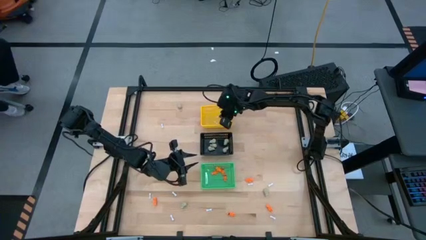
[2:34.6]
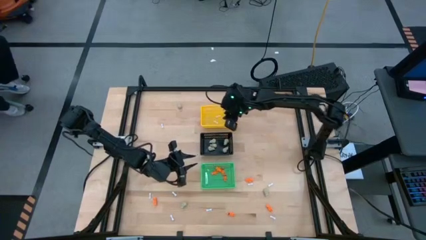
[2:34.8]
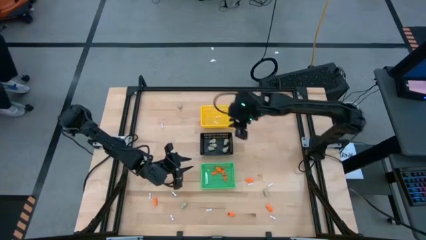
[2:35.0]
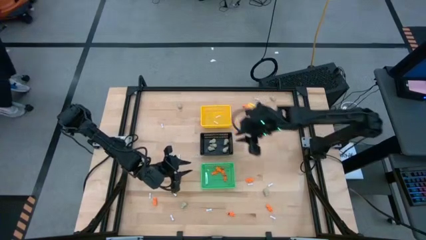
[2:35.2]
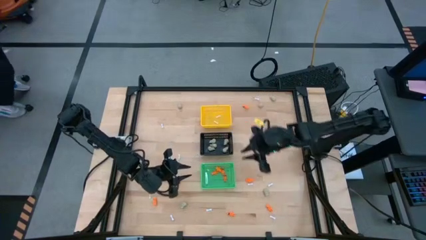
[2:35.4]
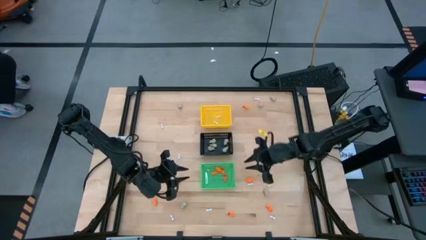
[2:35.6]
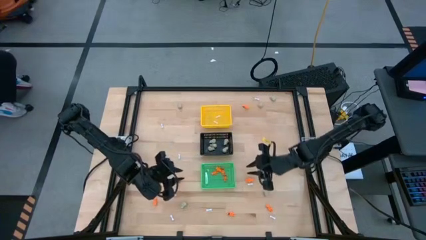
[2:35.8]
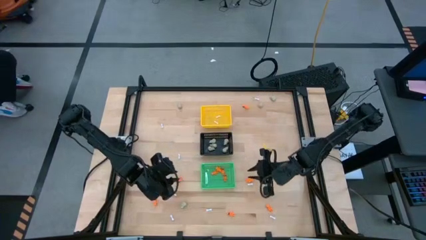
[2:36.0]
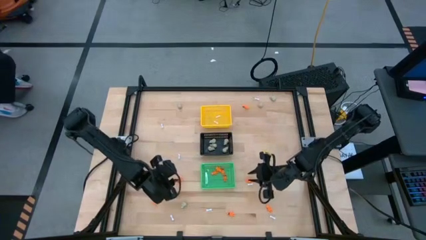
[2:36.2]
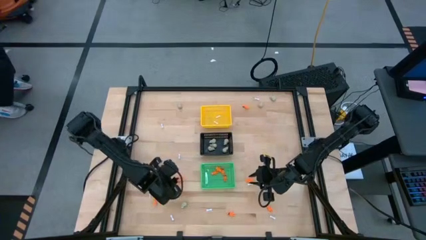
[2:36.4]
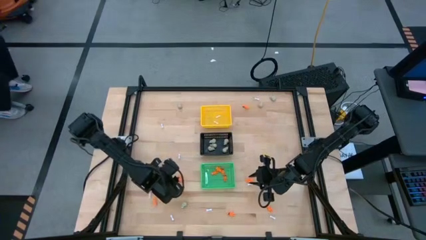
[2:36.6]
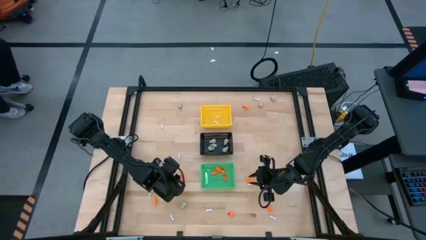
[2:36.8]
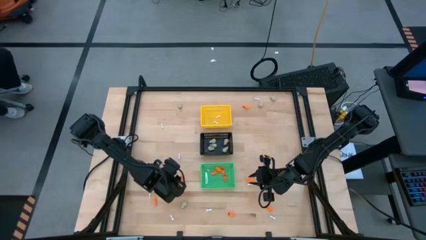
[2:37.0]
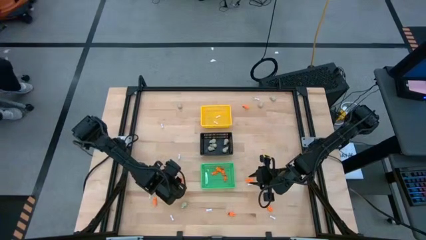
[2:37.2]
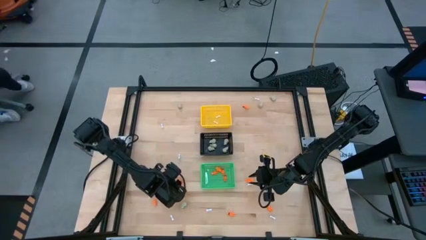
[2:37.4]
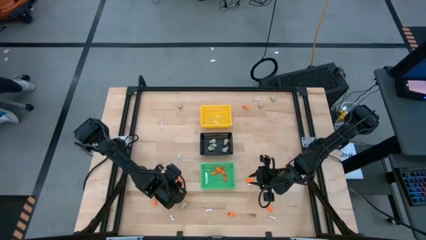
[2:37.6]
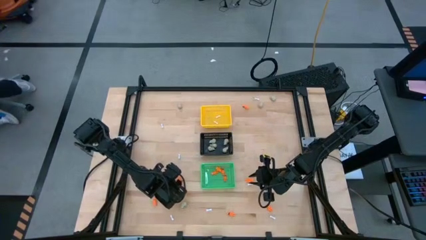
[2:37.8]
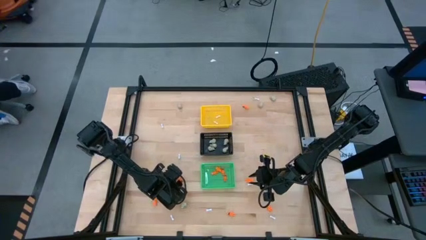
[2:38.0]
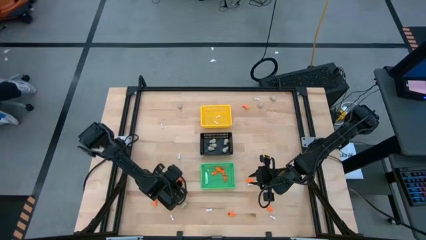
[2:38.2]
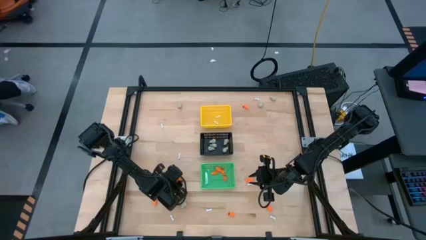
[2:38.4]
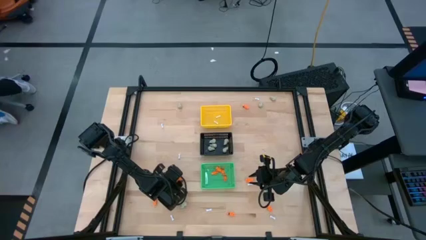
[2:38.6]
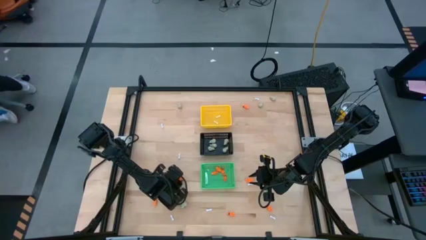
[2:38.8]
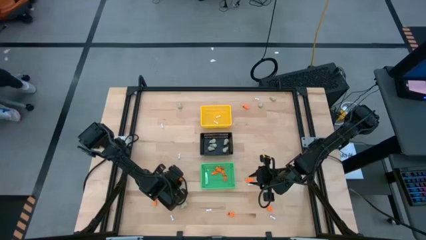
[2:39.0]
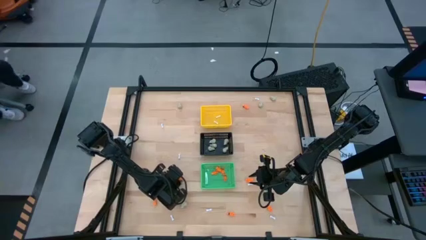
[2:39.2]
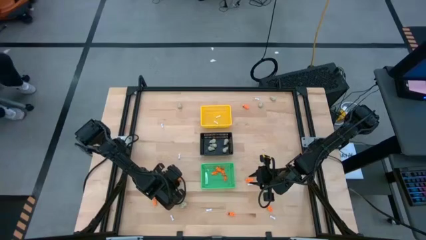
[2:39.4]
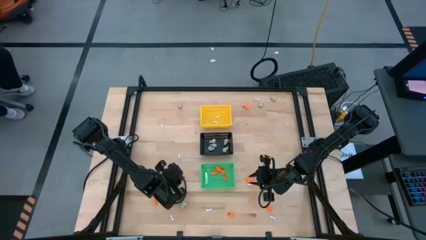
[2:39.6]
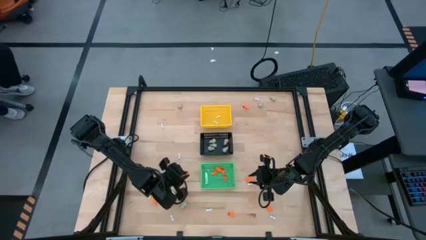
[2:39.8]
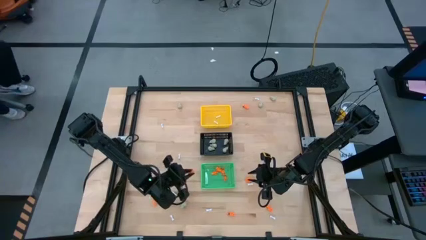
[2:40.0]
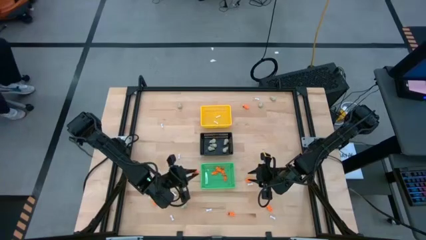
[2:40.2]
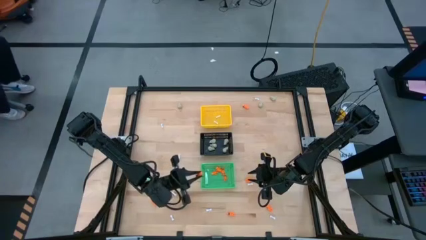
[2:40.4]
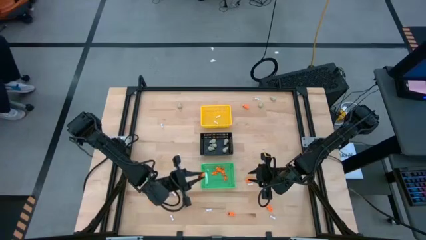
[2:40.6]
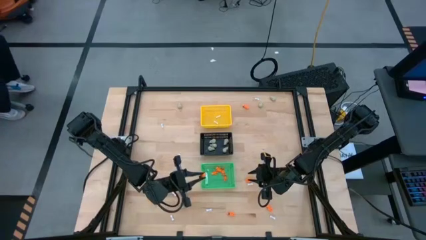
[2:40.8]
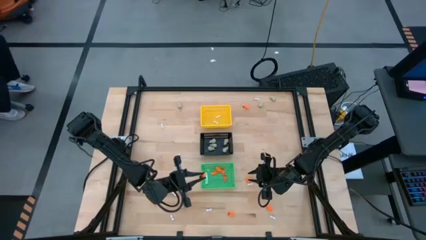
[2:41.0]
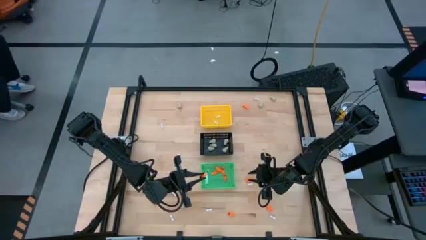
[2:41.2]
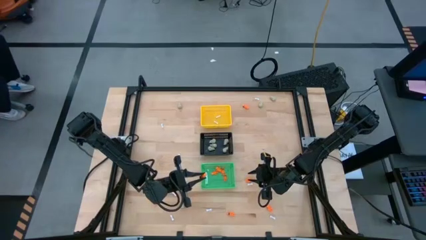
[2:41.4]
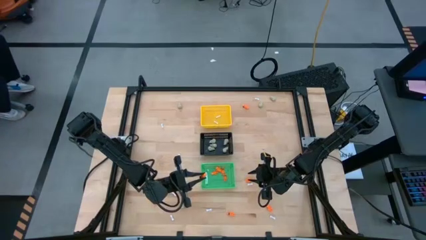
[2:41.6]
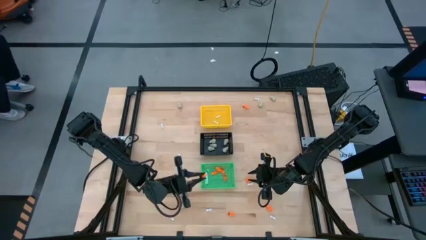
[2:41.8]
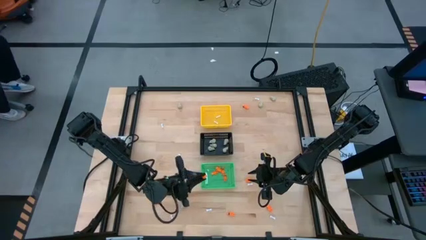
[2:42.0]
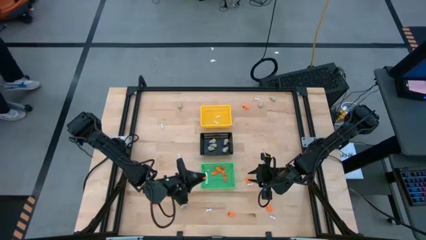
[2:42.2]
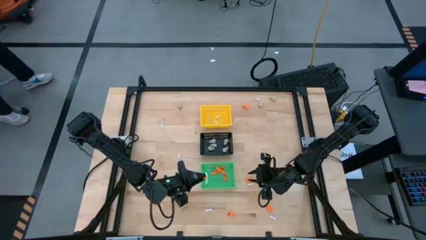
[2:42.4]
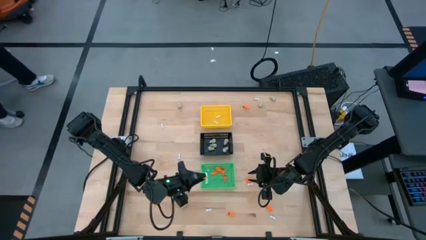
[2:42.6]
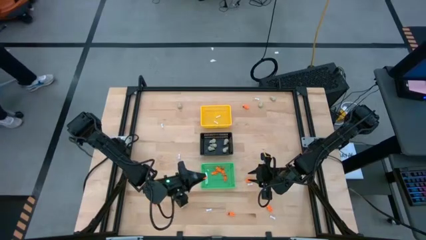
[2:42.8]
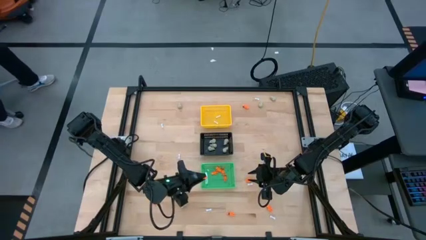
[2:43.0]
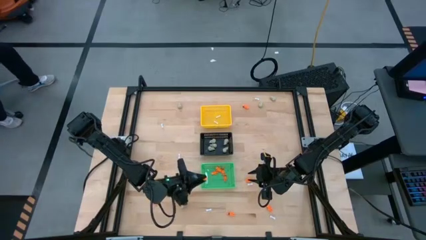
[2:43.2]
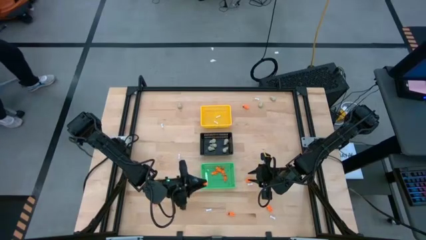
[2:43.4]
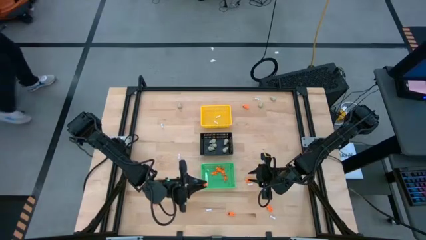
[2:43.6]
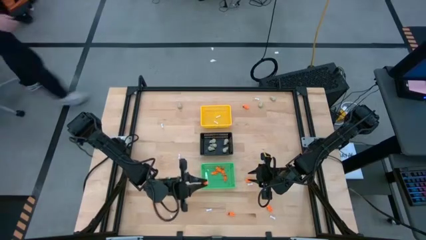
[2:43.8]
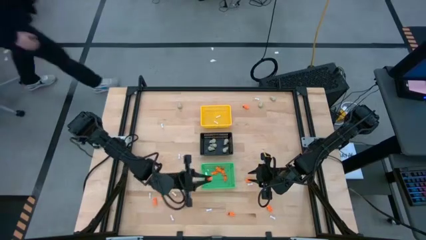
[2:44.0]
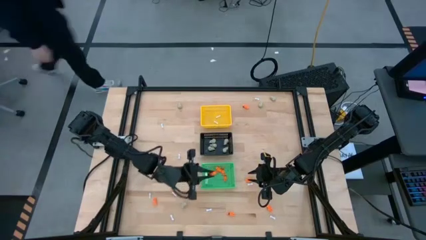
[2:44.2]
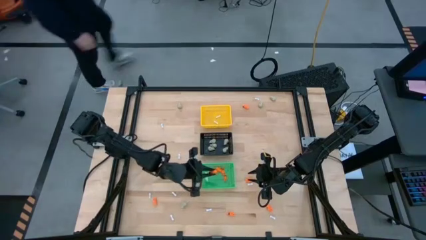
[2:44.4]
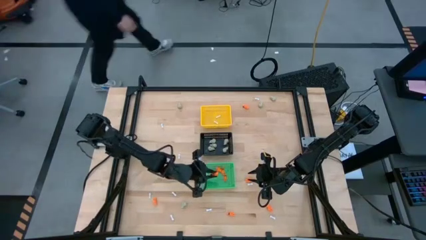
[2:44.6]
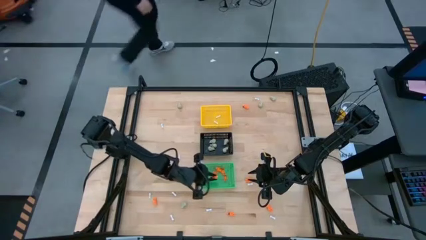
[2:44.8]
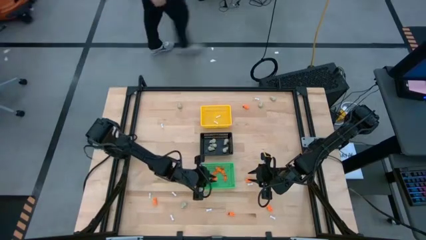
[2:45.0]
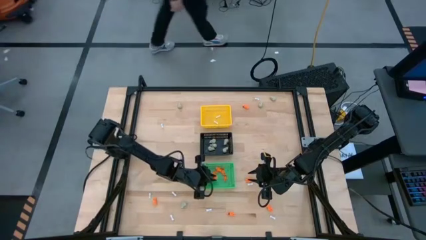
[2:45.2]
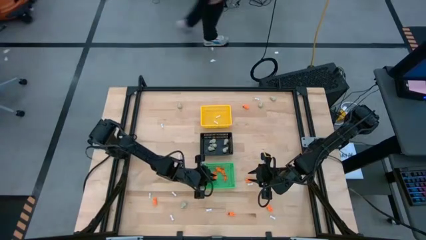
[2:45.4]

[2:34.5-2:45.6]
Task: Sort Halloween decoration
Put the orange skeleton toy into the green basket
